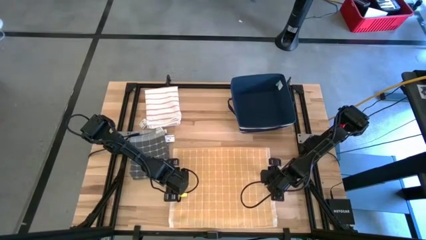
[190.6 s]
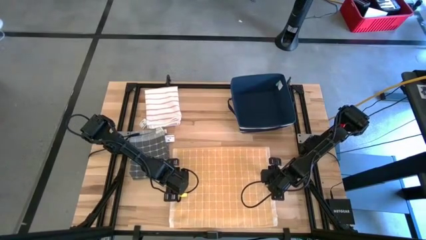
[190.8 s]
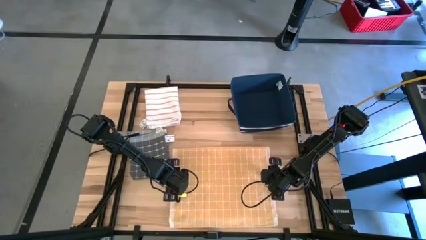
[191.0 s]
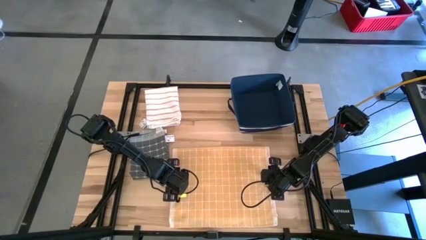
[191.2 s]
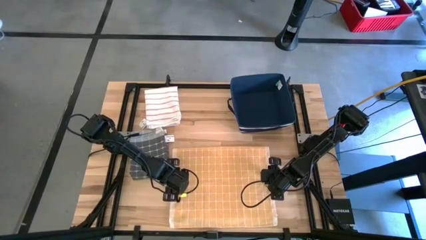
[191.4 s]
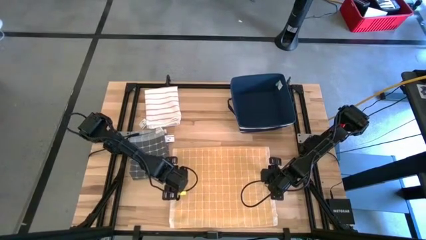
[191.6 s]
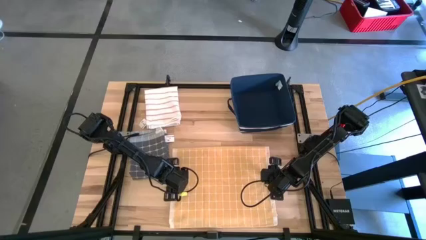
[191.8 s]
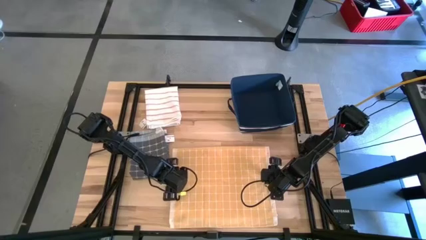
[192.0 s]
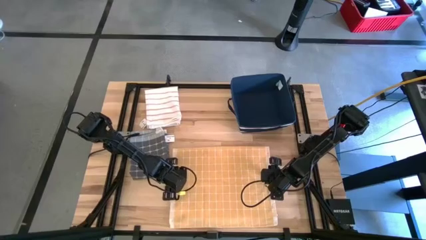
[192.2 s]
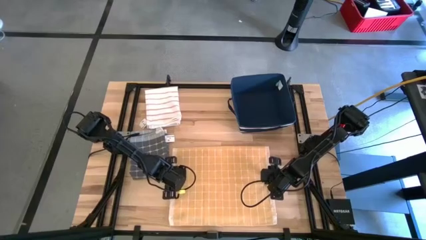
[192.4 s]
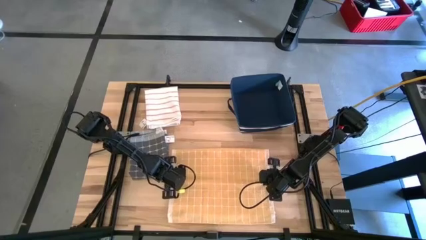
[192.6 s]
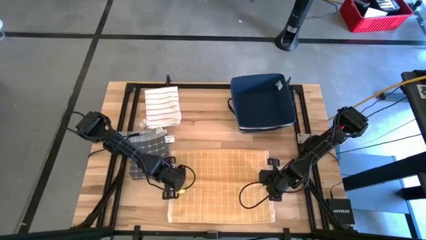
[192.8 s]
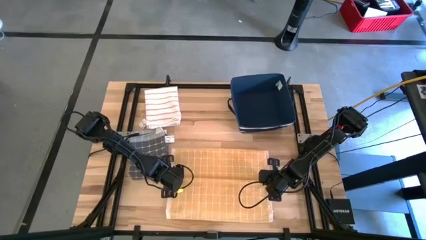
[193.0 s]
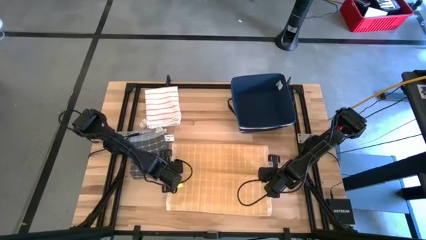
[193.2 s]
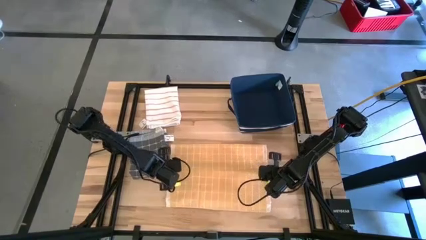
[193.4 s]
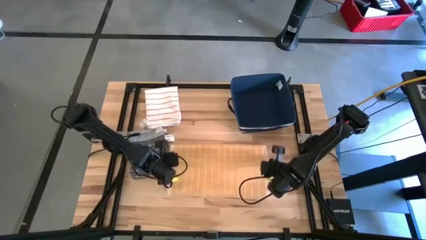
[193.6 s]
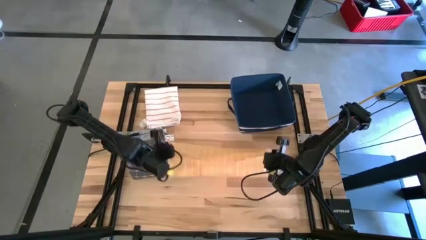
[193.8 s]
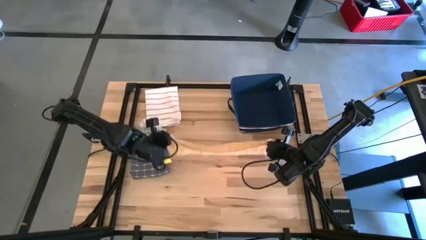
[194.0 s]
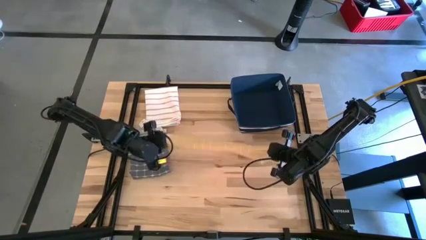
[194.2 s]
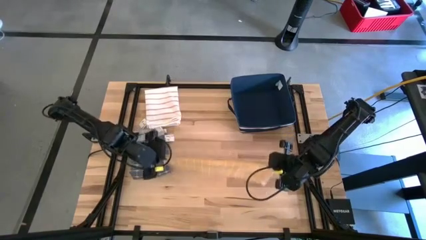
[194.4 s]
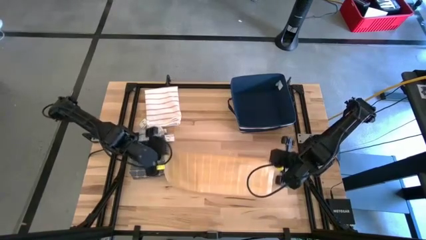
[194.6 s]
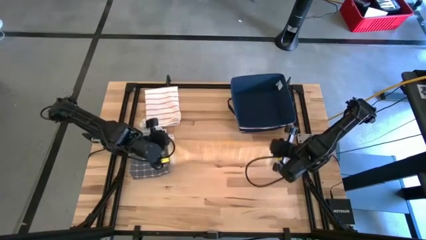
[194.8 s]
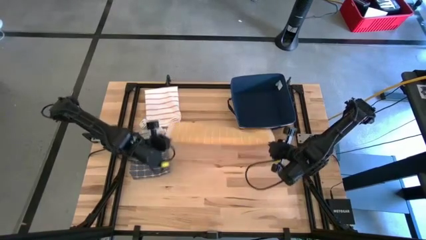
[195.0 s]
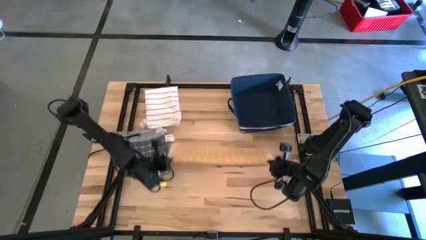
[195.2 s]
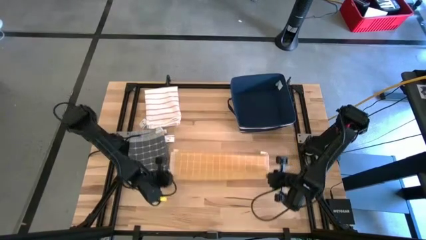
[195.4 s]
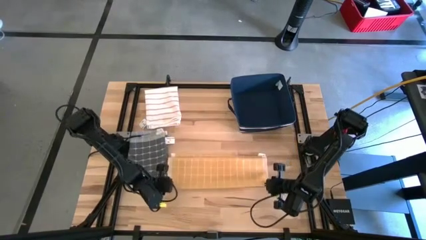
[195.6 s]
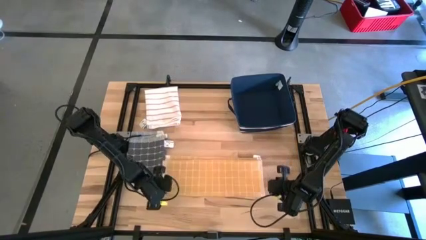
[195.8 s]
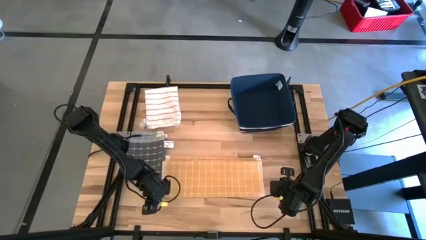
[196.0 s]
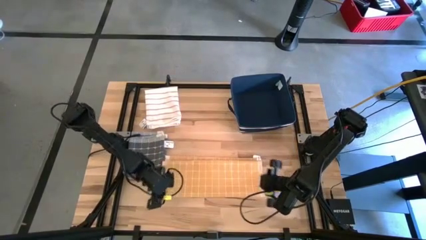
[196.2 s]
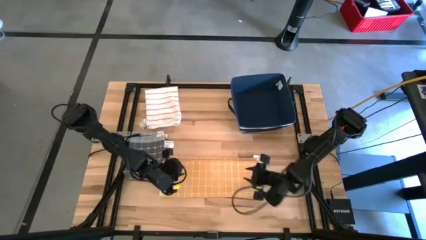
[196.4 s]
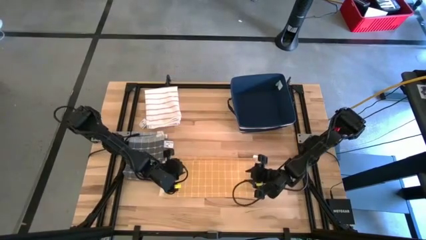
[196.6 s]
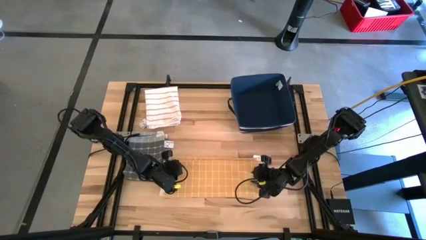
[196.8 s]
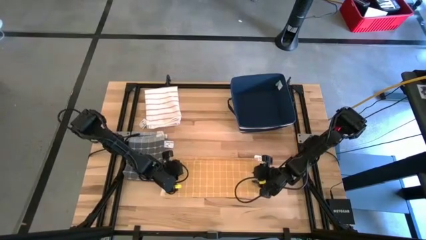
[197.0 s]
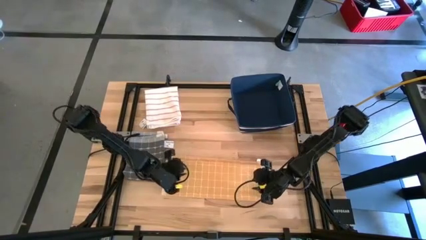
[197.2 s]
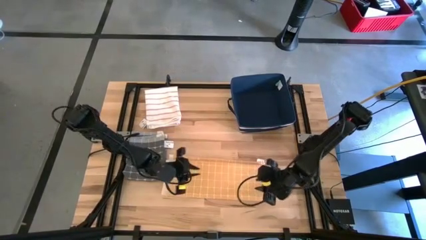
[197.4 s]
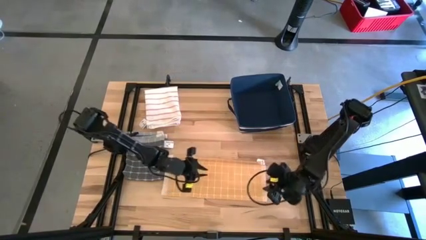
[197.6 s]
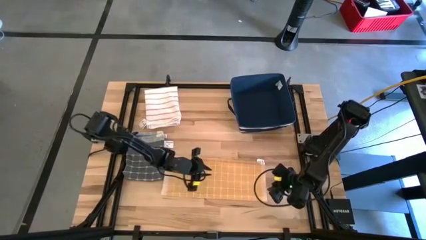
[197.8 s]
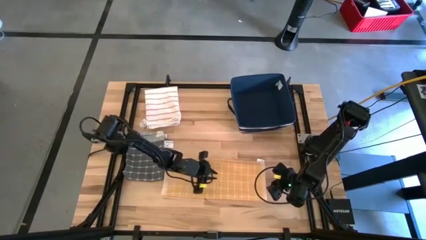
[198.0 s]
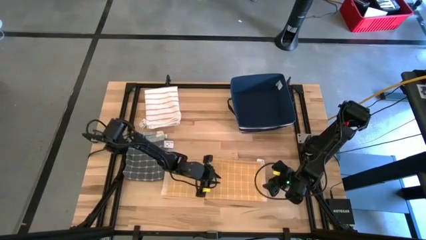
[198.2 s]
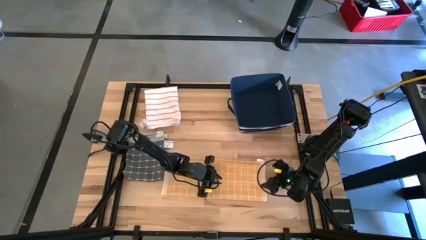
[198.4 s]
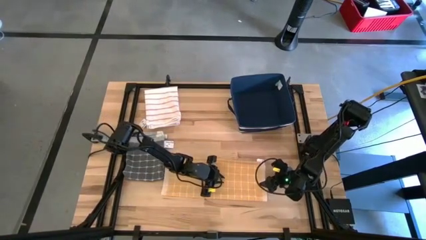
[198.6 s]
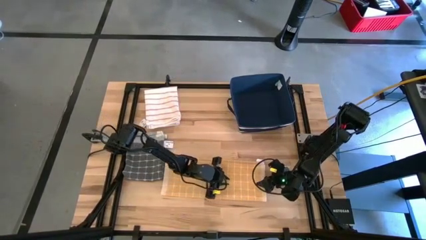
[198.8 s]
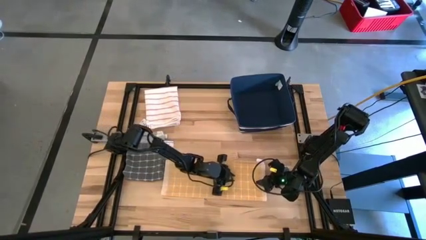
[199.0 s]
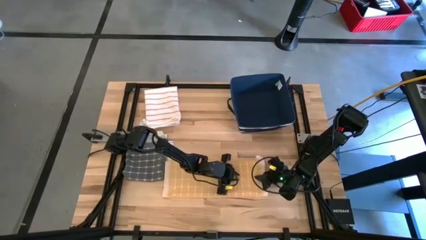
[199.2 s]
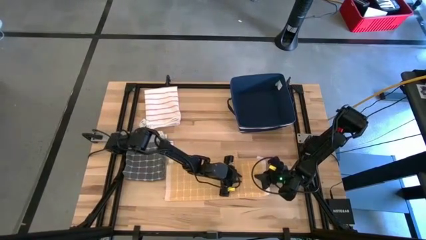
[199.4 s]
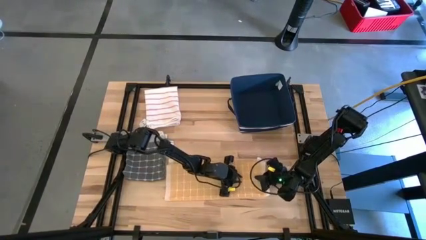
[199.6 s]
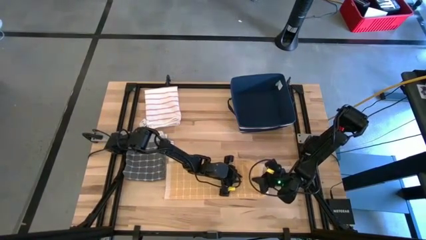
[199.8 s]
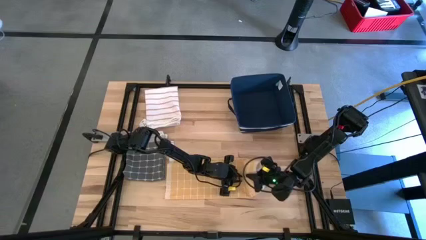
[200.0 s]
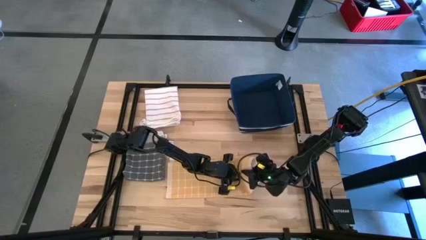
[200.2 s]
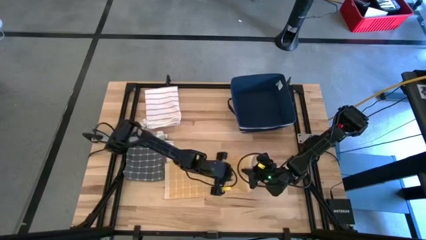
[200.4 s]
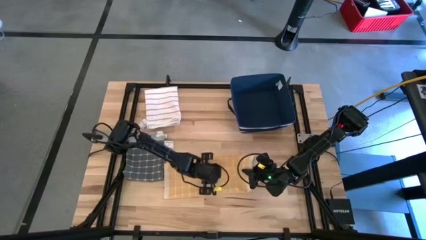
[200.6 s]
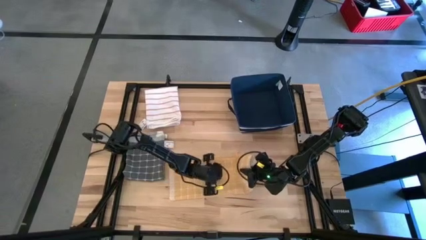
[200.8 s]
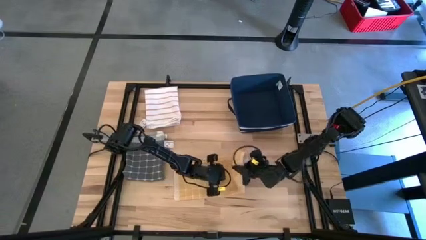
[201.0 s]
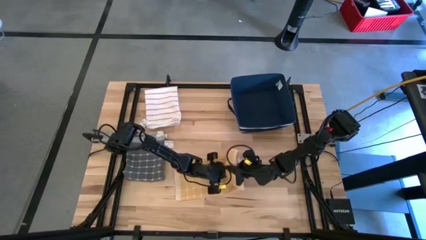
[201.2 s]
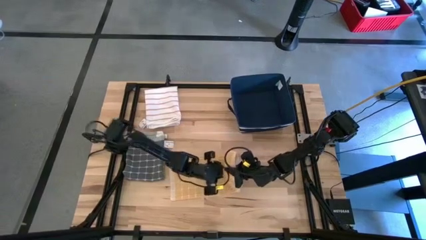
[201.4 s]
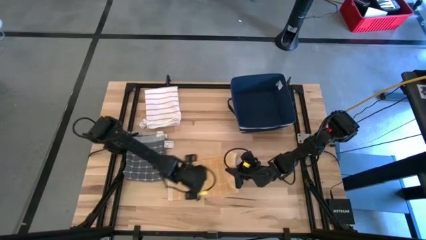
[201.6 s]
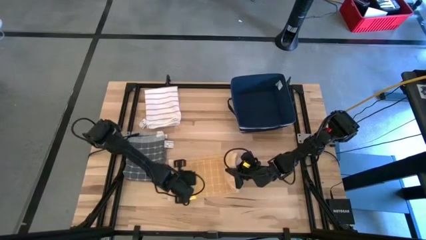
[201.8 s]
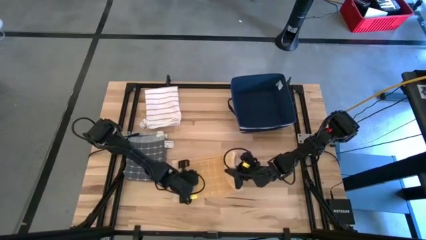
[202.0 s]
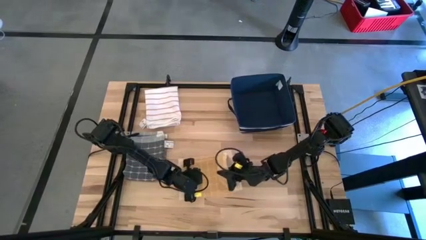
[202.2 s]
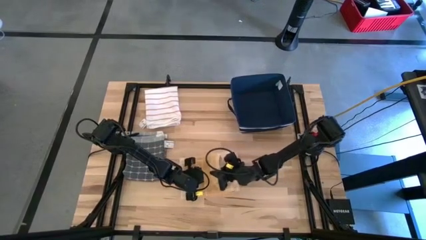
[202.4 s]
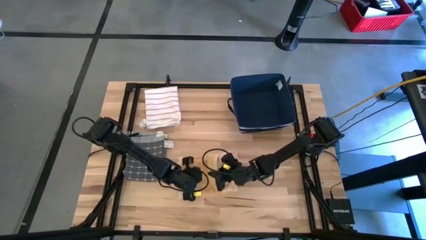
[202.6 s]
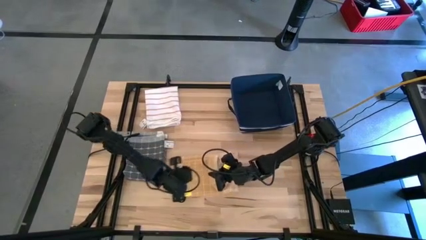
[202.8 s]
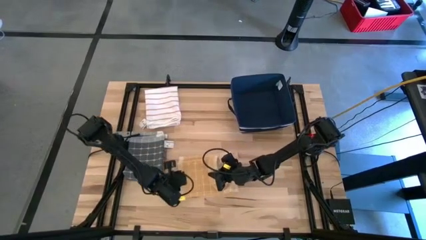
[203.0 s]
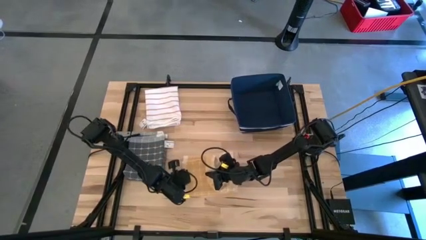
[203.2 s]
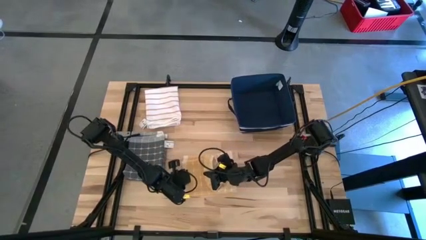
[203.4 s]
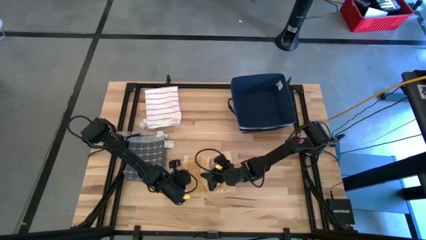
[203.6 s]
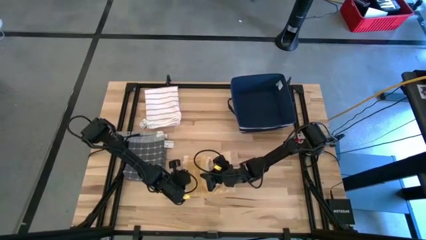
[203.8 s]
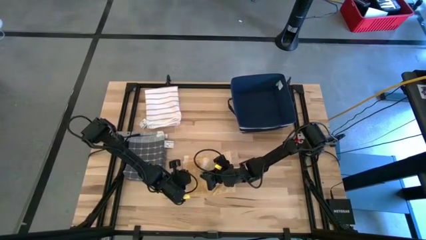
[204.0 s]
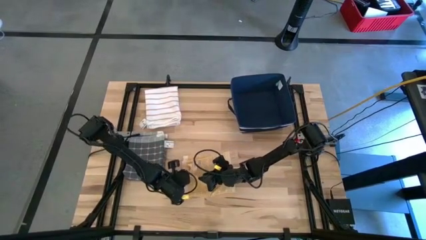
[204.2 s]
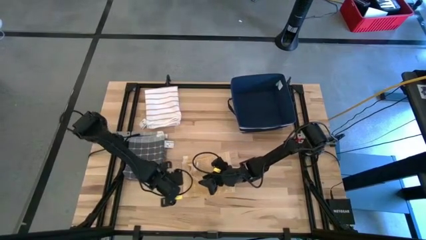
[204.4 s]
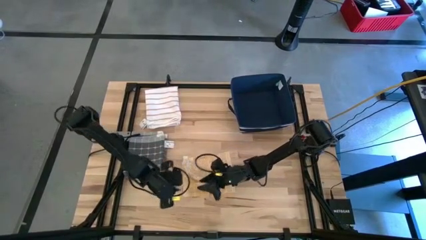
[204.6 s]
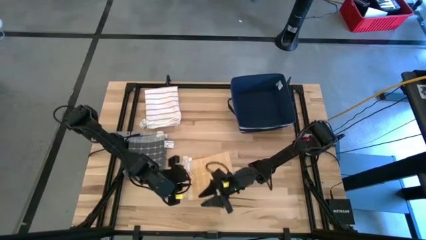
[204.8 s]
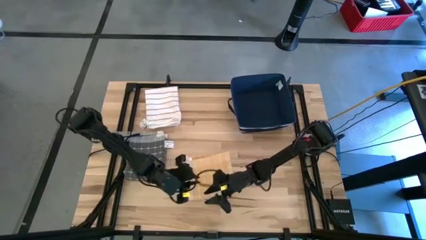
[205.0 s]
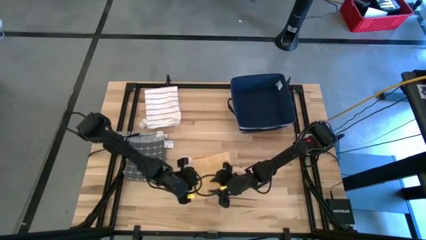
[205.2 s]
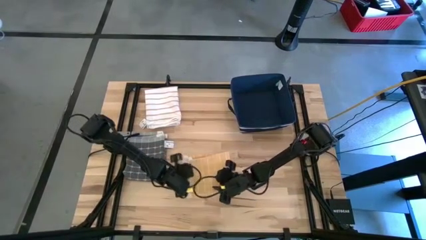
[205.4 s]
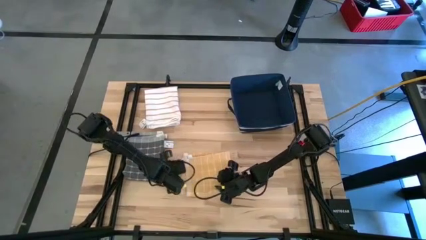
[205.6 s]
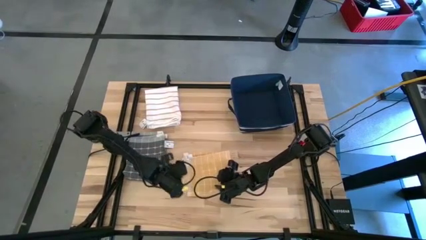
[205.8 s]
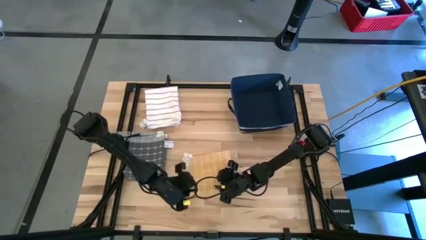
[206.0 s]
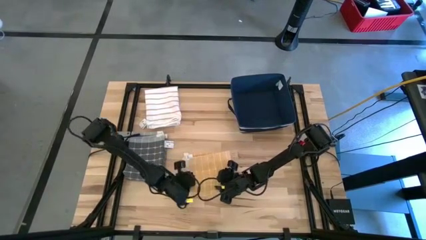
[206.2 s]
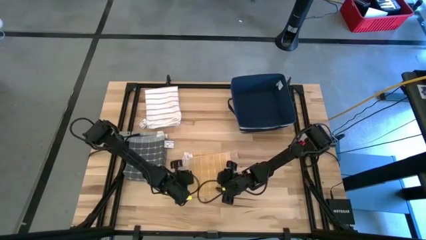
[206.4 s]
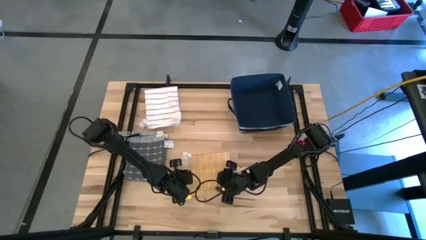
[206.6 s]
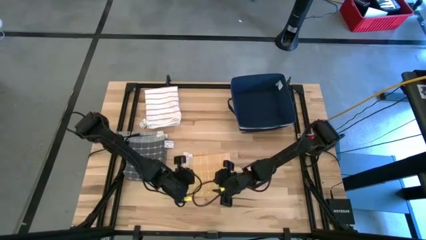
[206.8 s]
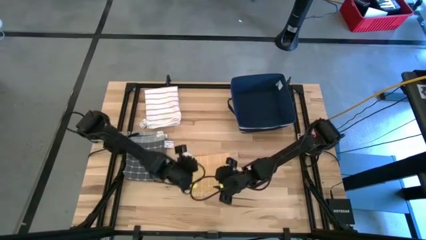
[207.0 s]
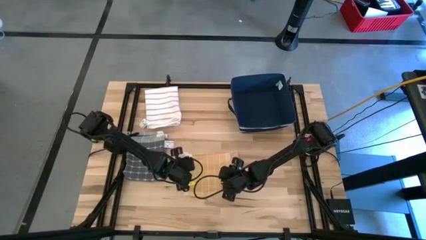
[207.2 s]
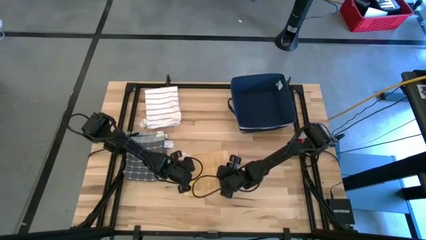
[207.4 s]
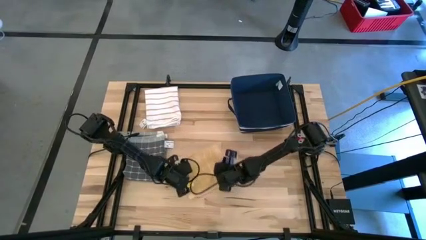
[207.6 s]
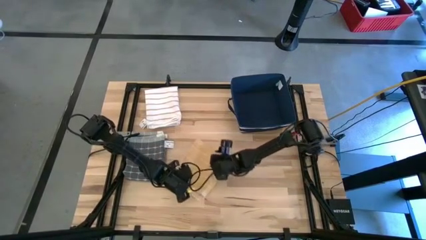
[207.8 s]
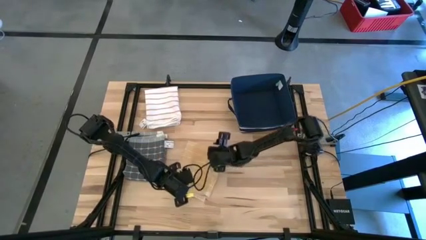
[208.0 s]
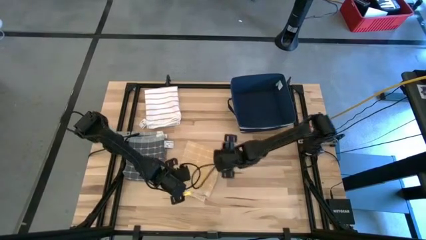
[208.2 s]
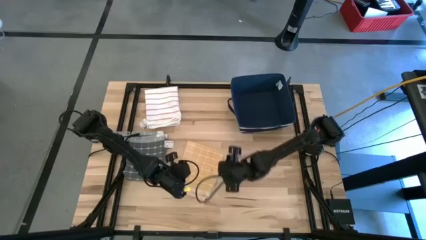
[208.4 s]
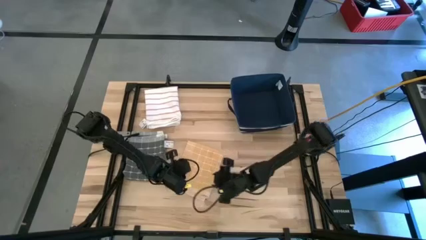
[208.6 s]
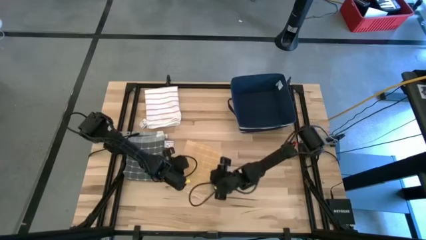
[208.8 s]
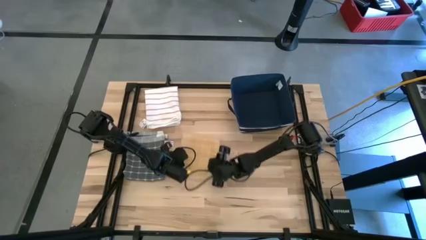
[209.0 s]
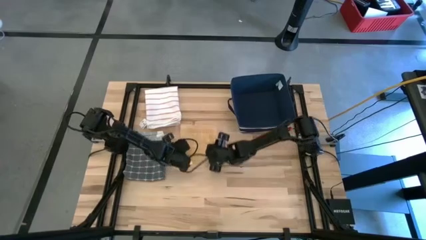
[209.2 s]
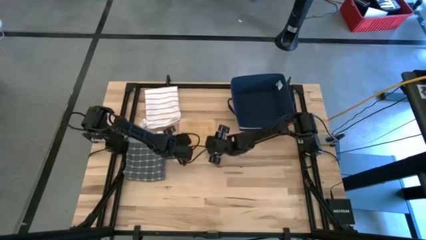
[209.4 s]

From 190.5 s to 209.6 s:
Task: Fold towel
Fold the orange towel
